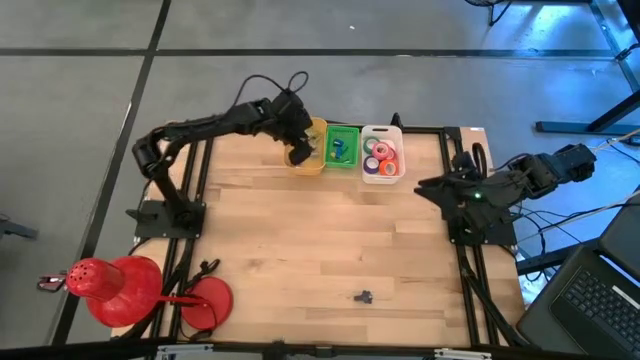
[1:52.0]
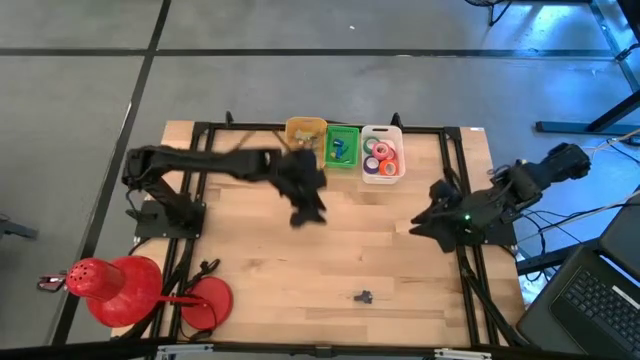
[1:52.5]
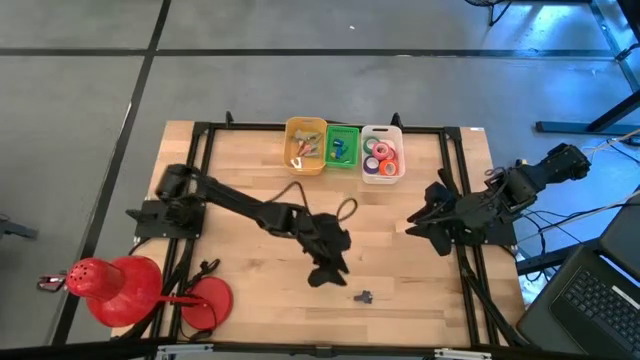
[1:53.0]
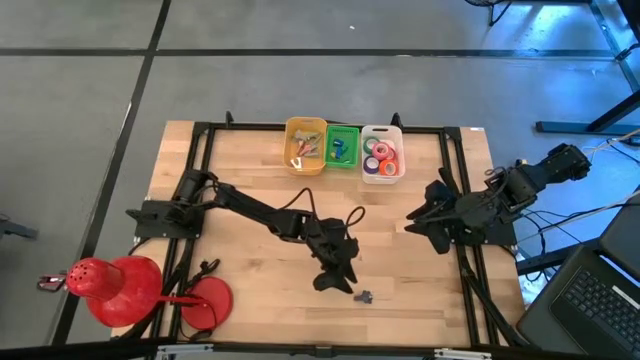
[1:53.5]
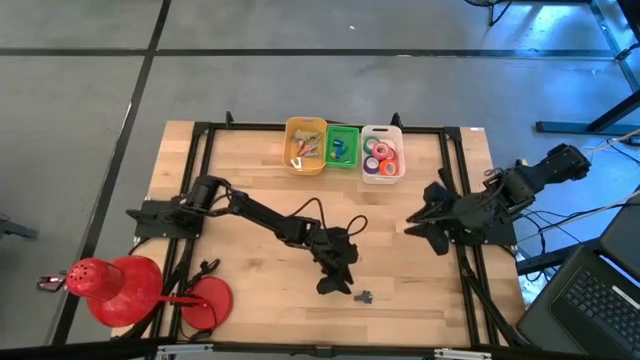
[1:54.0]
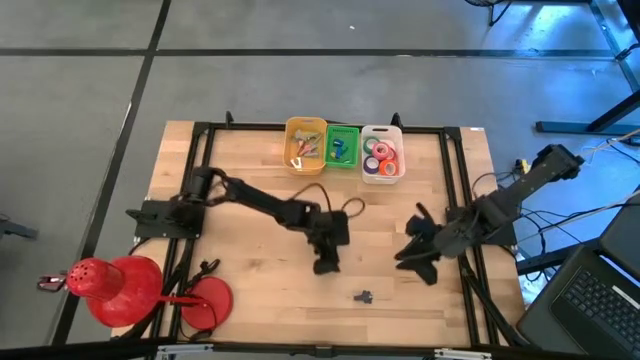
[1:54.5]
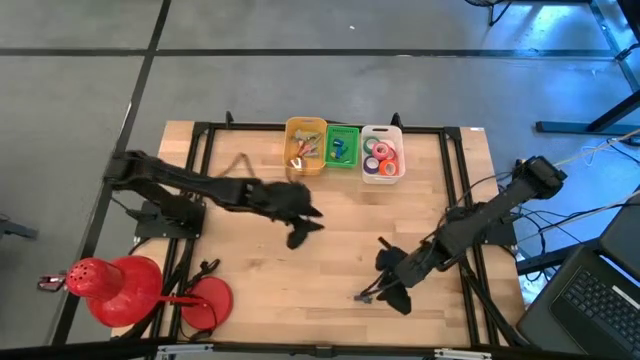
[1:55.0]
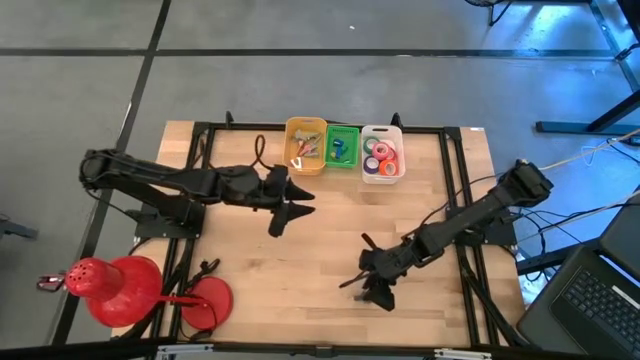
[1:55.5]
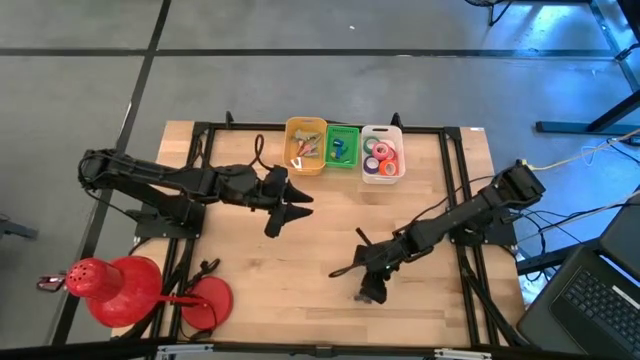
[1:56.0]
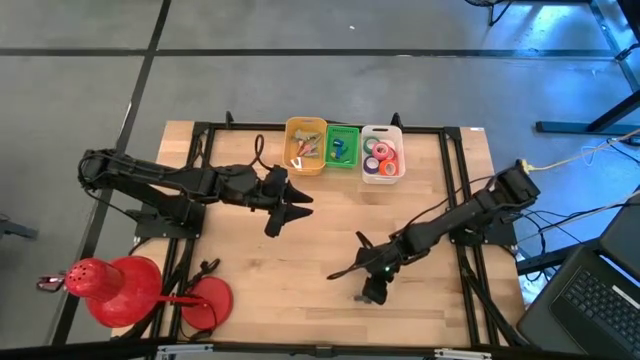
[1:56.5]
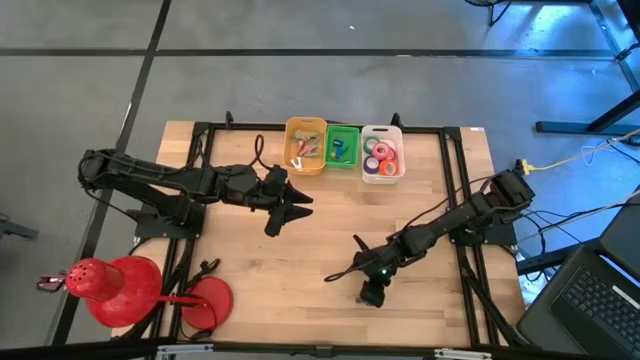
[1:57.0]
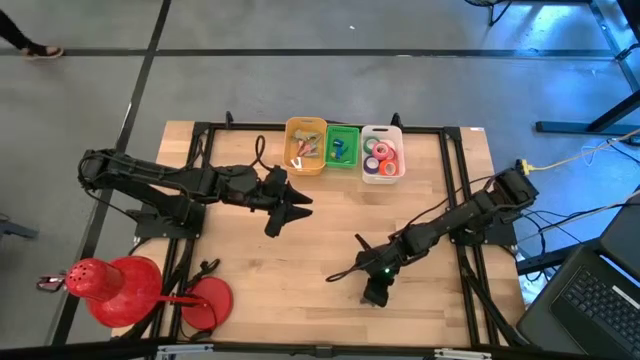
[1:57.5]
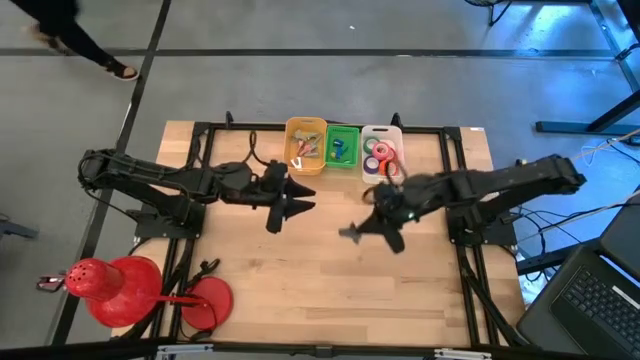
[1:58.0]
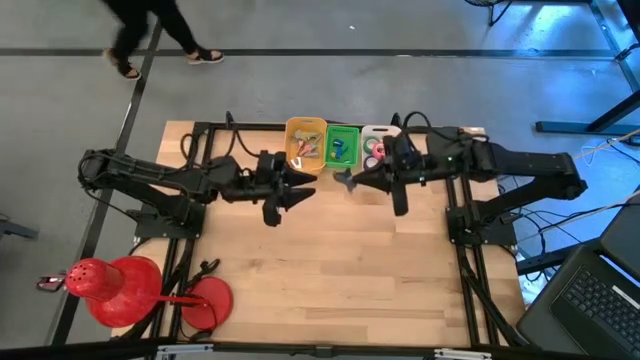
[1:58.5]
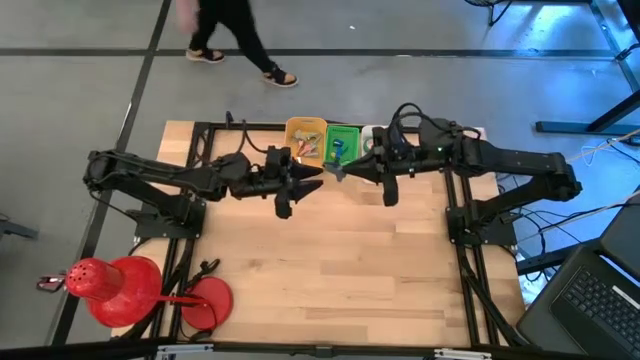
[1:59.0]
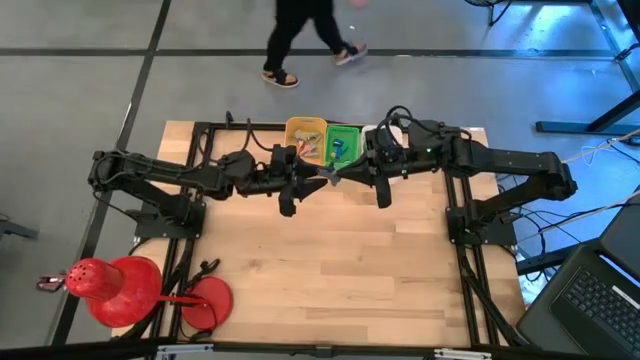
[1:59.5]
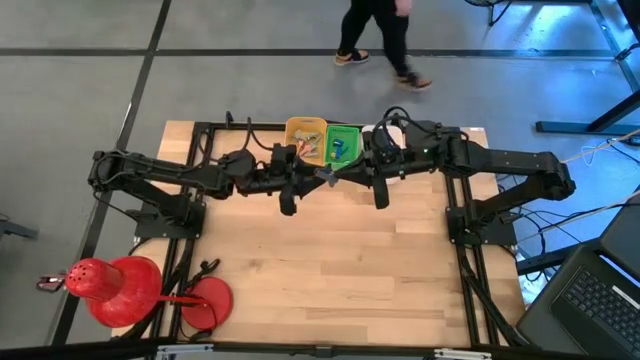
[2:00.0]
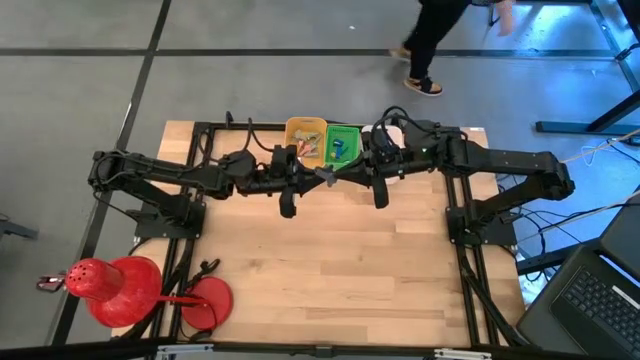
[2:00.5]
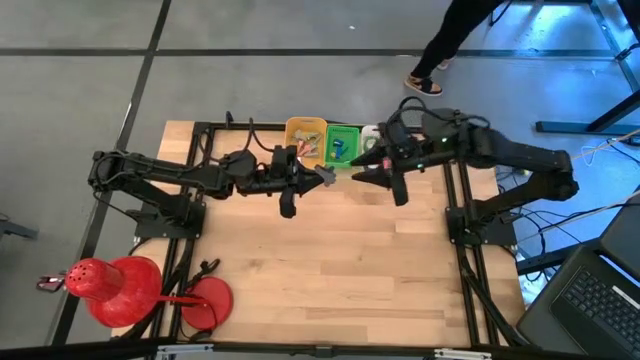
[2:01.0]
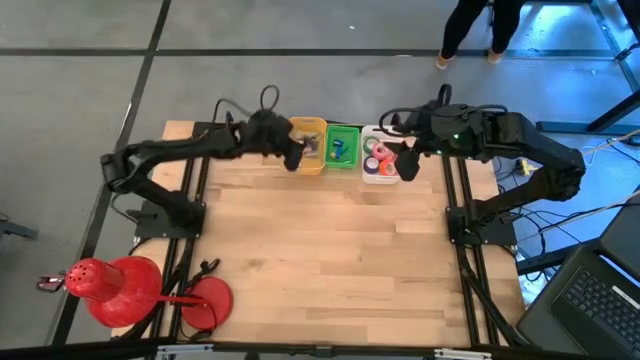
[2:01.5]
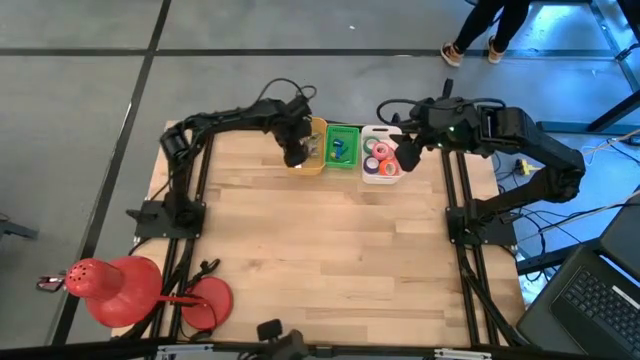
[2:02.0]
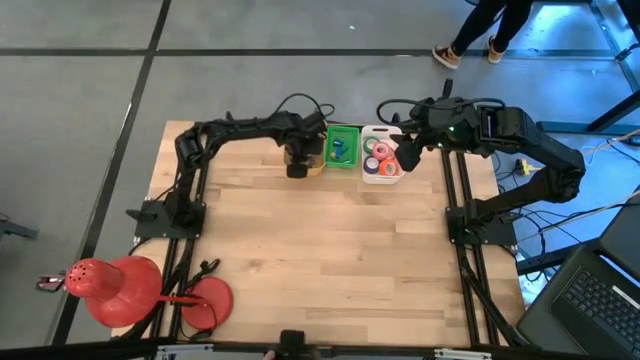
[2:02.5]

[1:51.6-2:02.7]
Task: Pick and place Stapler, Stapler remover, tape
Put the black staple remover into the yellow bin

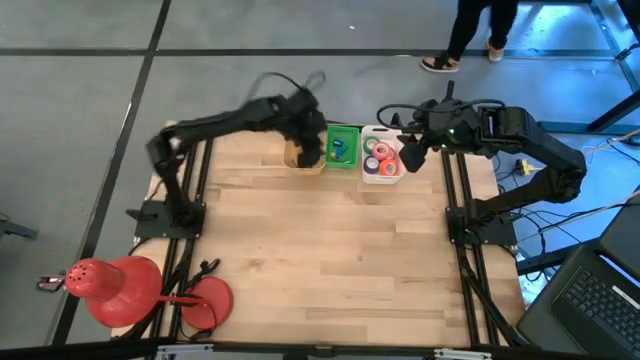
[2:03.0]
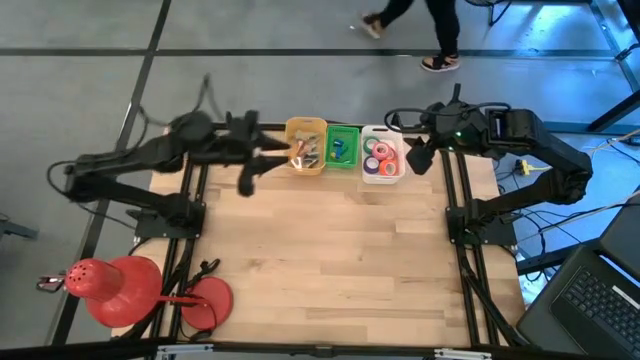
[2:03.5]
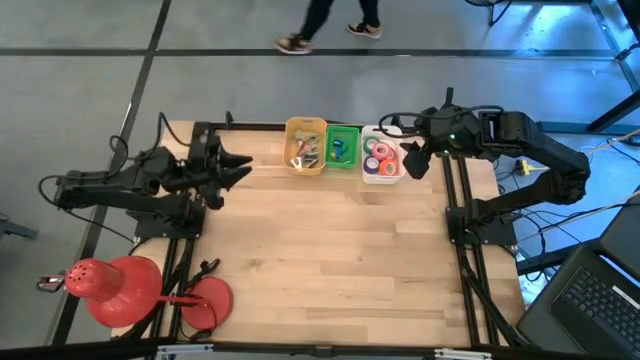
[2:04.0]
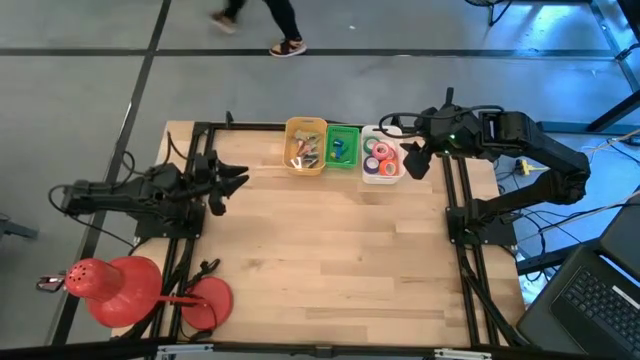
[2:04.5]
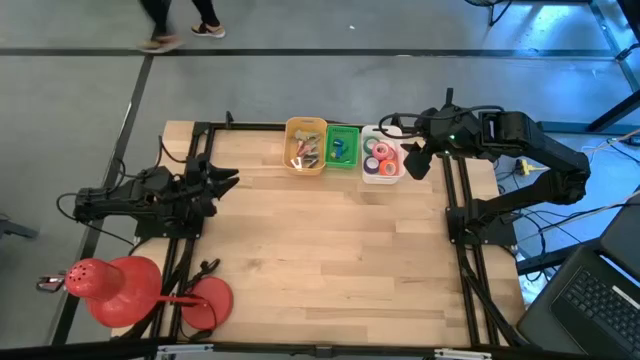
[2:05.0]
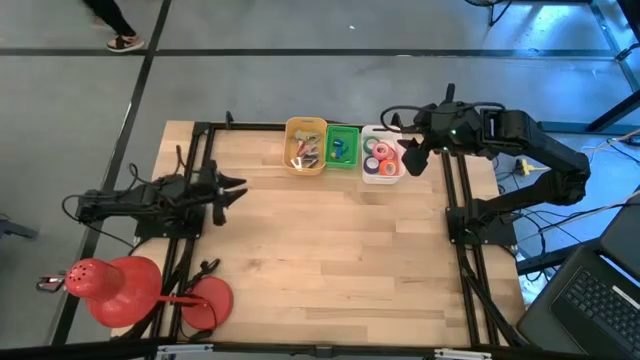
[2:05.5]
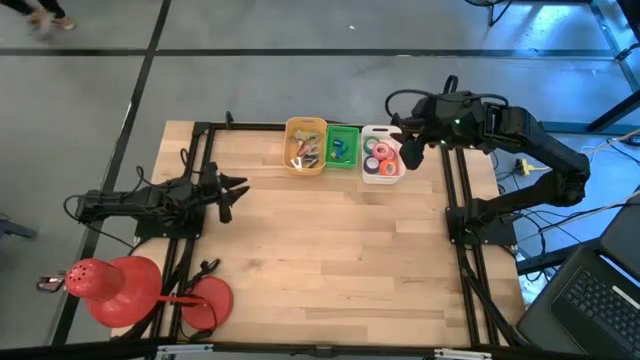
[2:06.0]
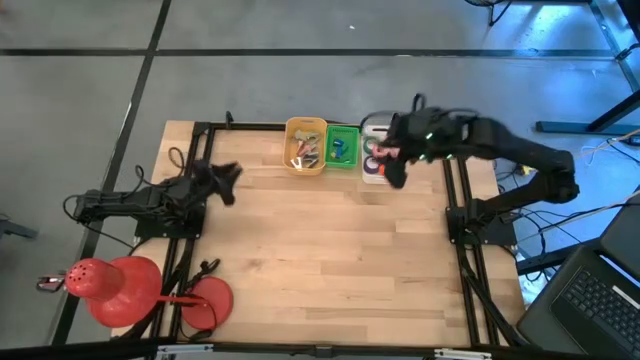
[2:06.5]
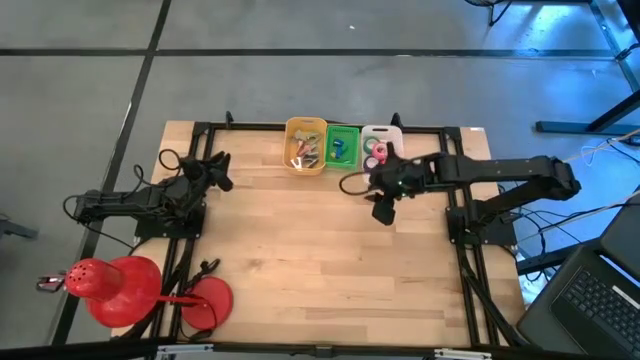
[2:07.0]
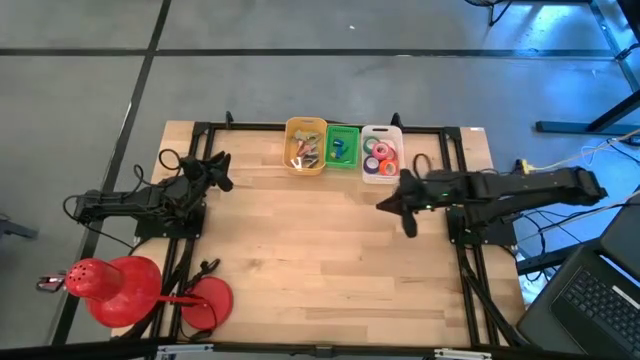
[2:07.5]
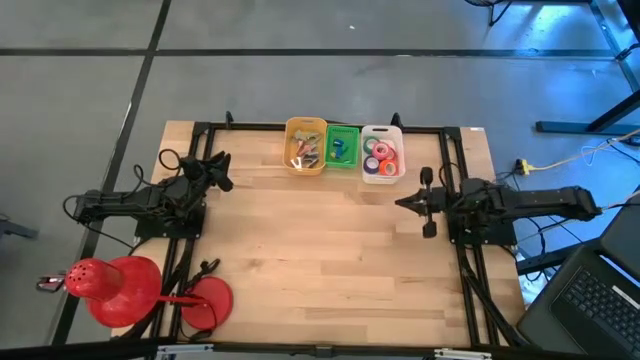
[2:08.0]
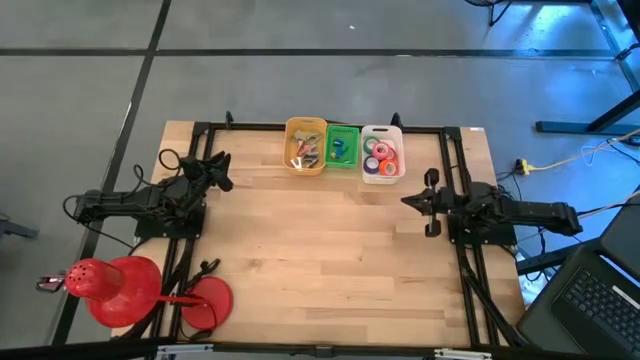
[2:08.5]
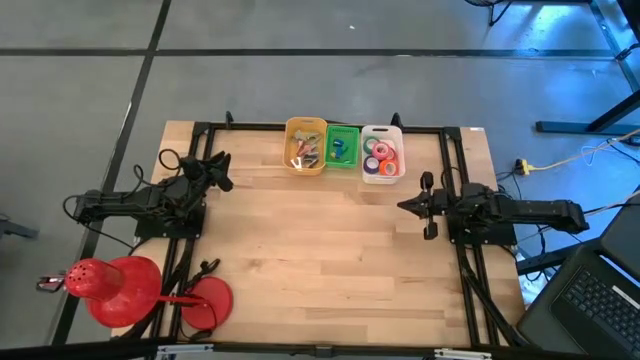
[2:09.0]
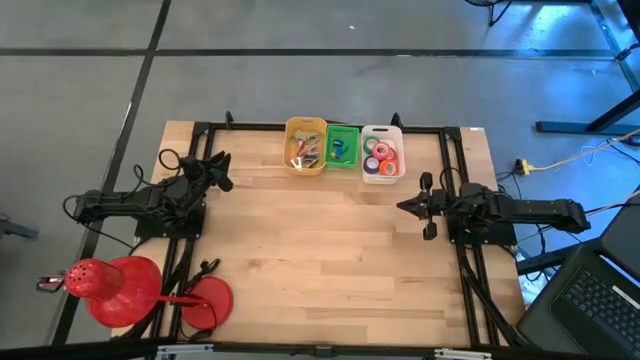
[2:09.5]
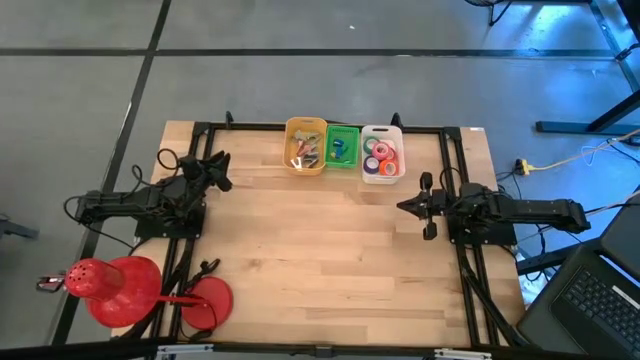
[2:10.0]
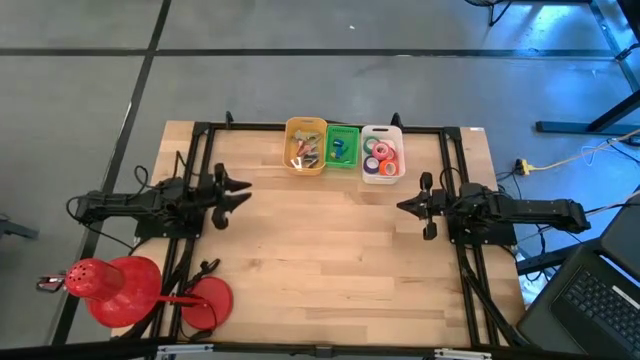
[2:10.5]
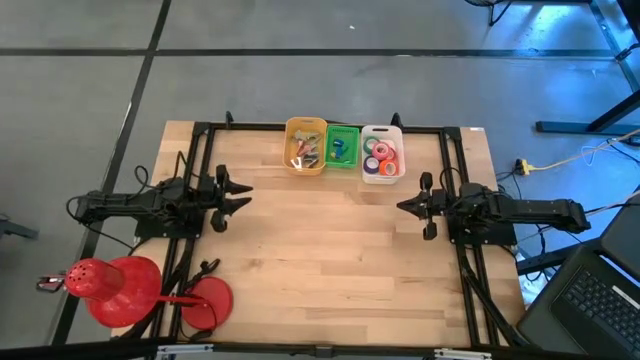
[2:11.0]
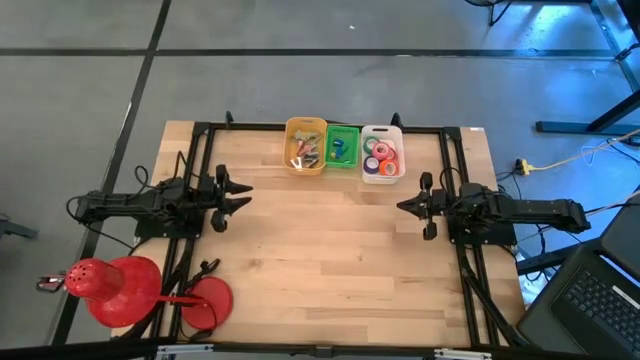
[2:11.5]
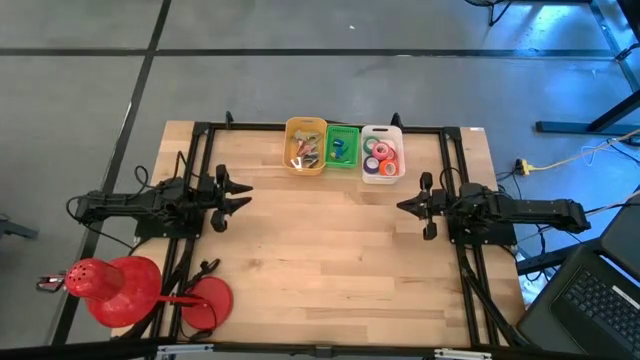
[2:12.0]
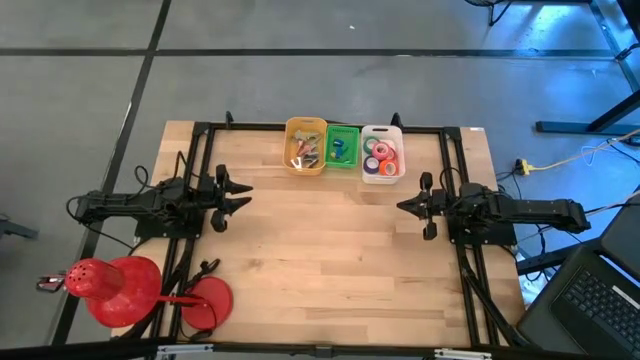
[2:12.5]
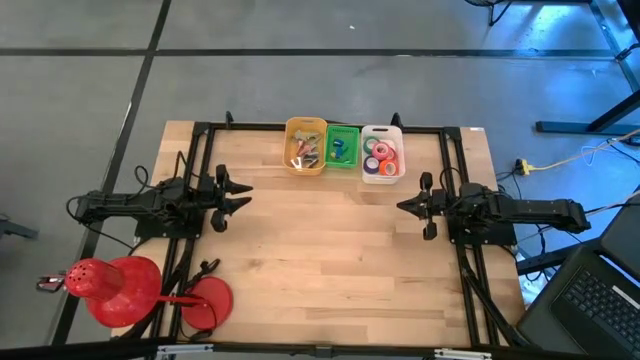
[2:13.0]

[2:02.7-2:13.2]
Return to Home Position
